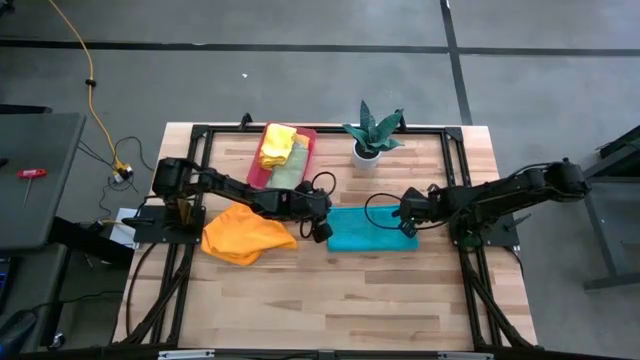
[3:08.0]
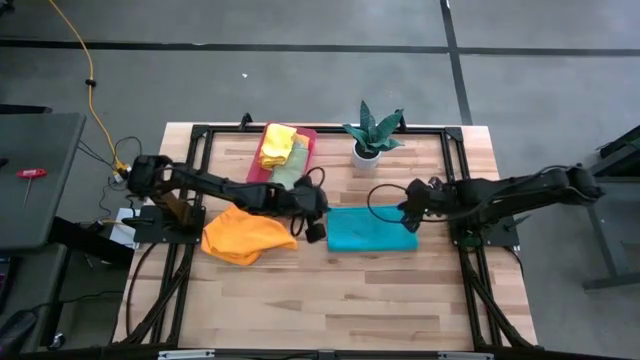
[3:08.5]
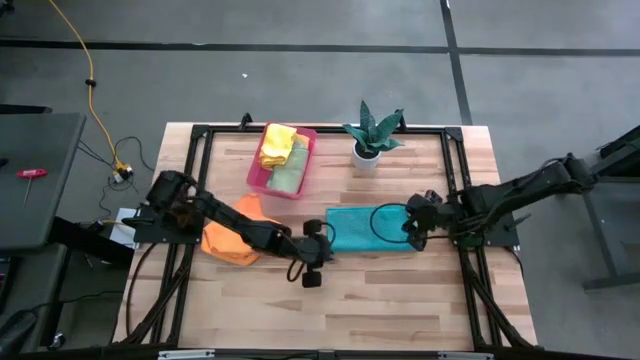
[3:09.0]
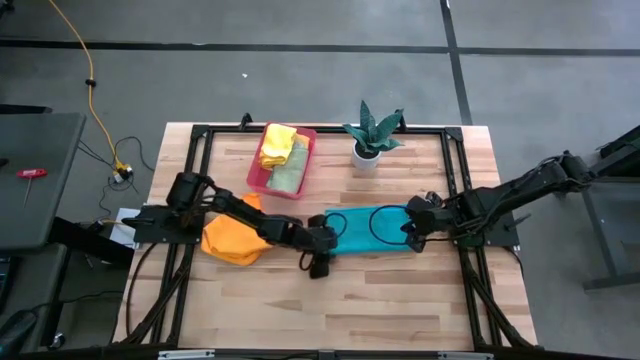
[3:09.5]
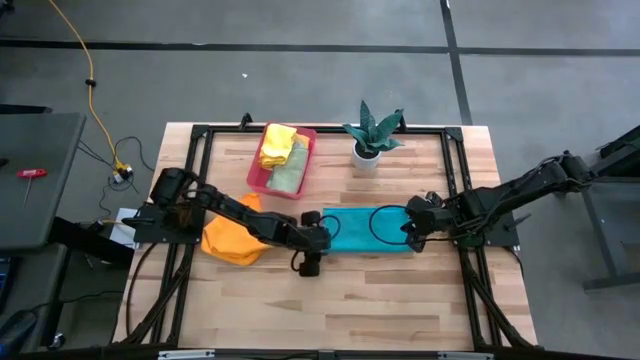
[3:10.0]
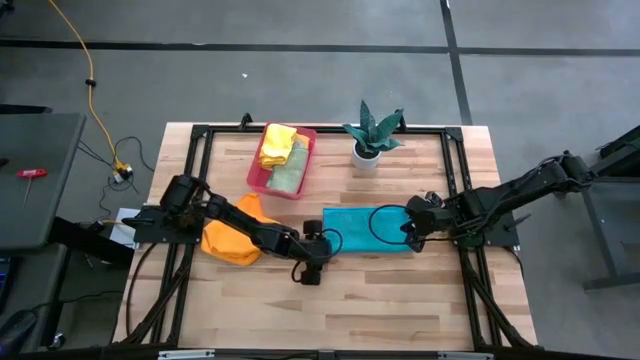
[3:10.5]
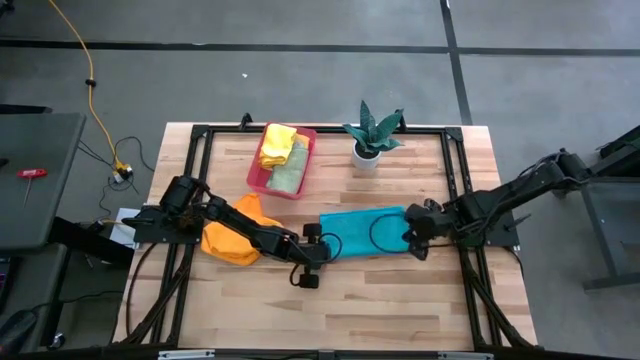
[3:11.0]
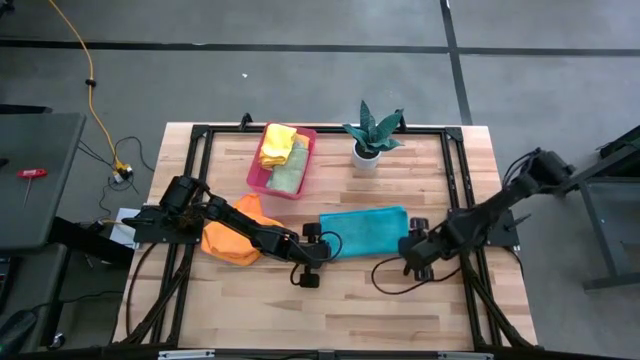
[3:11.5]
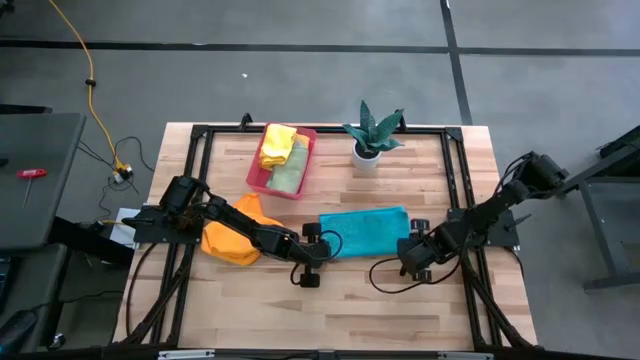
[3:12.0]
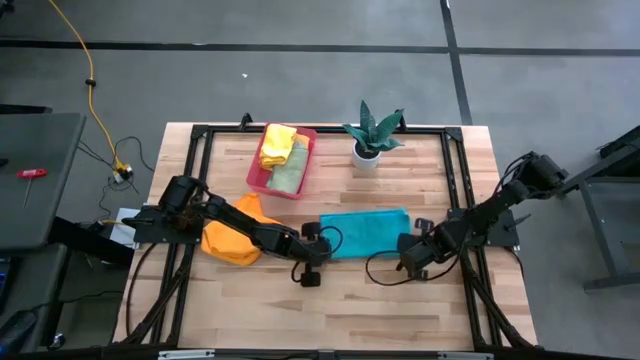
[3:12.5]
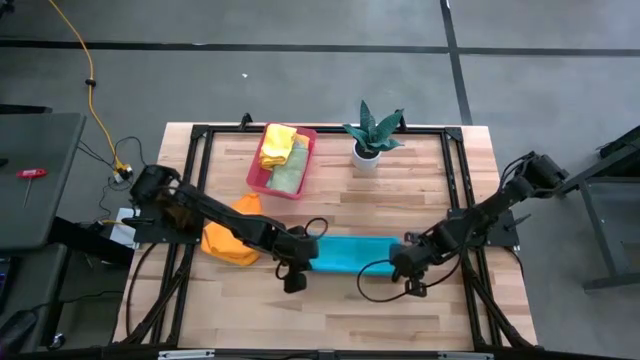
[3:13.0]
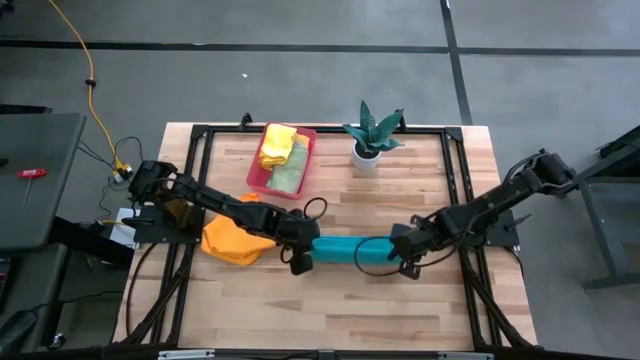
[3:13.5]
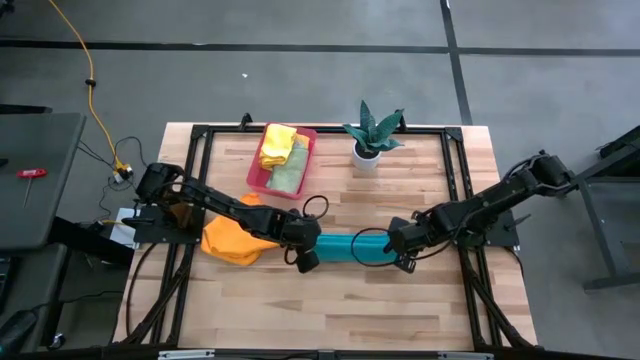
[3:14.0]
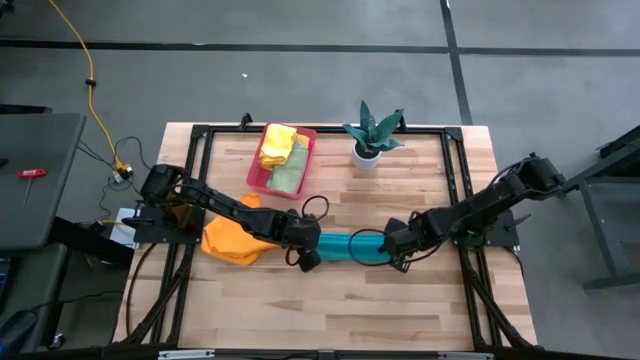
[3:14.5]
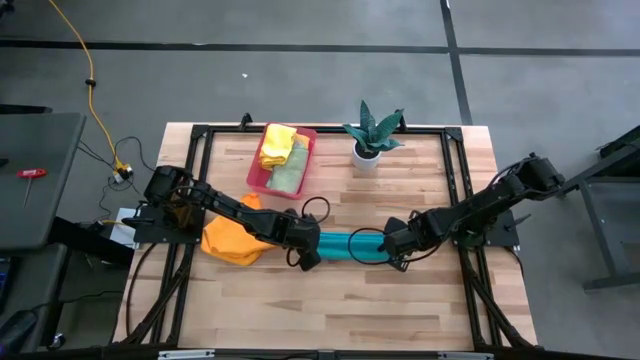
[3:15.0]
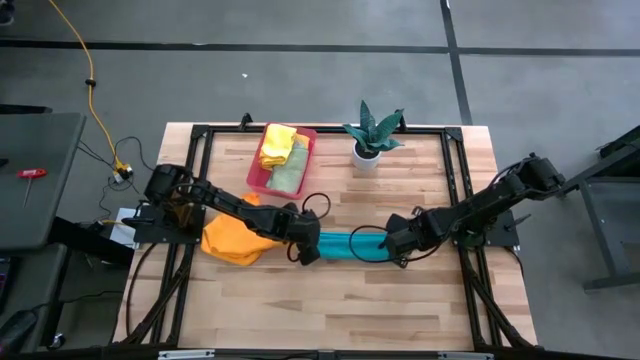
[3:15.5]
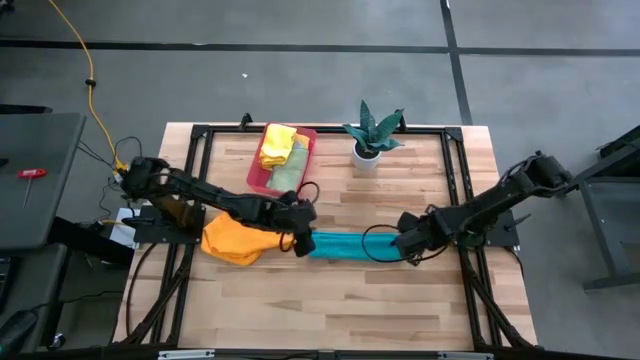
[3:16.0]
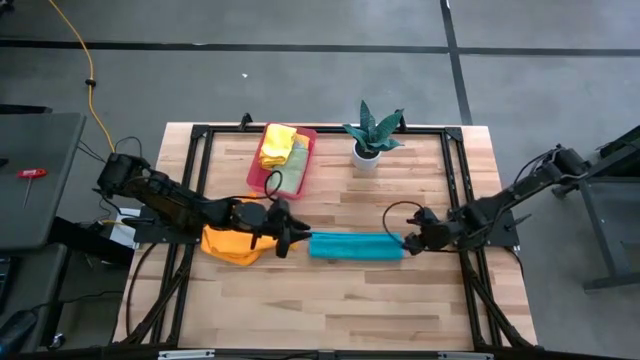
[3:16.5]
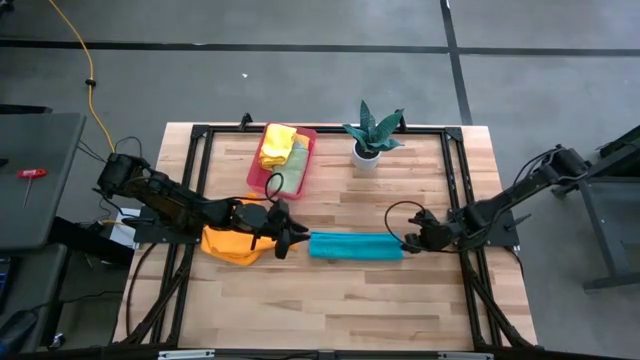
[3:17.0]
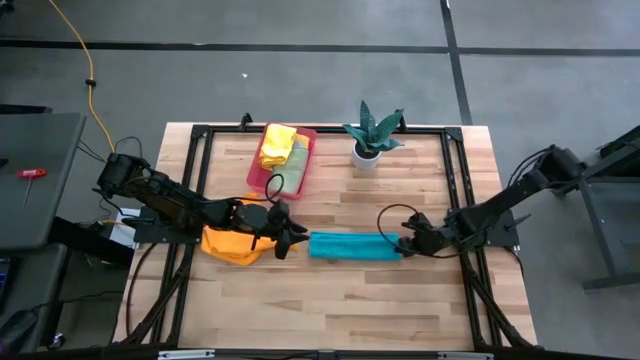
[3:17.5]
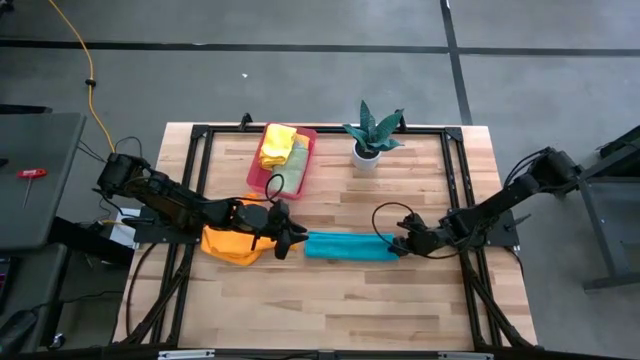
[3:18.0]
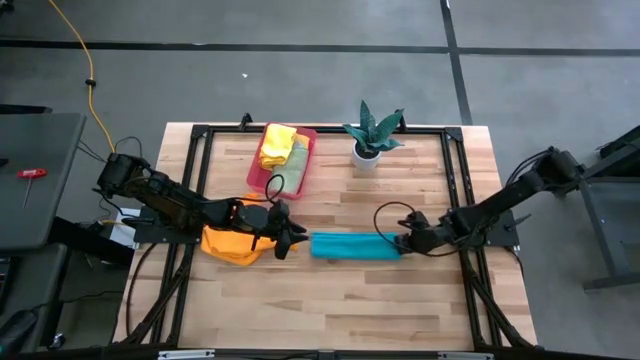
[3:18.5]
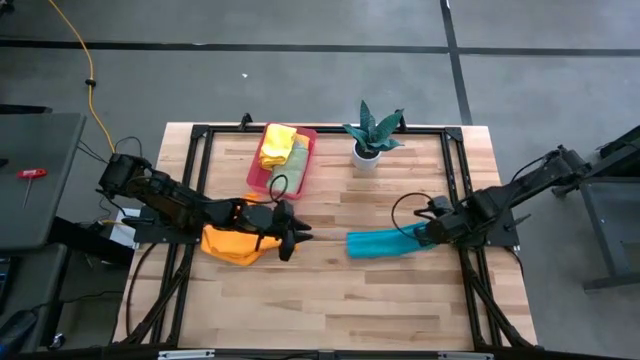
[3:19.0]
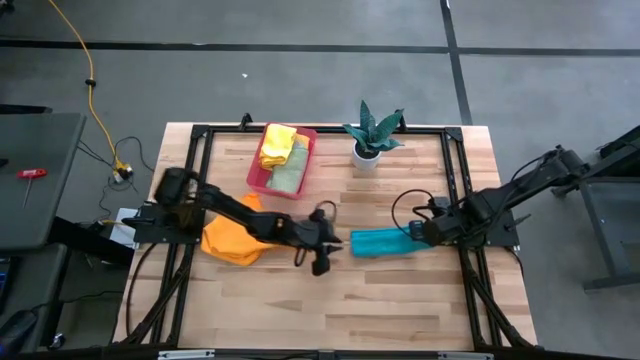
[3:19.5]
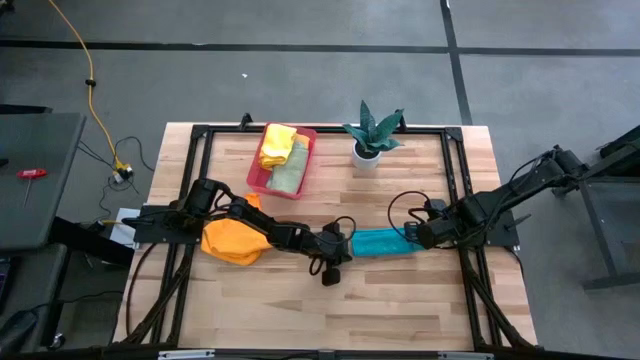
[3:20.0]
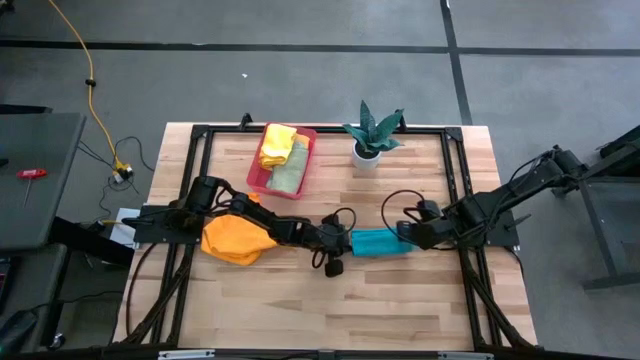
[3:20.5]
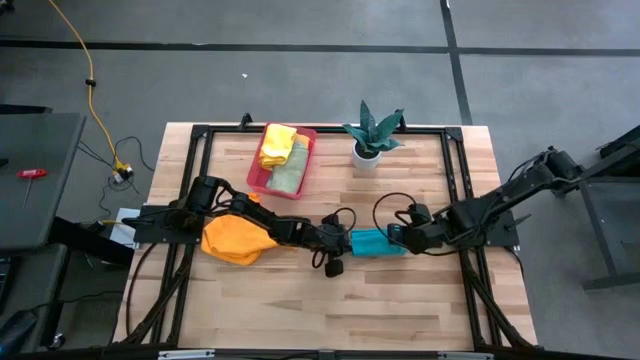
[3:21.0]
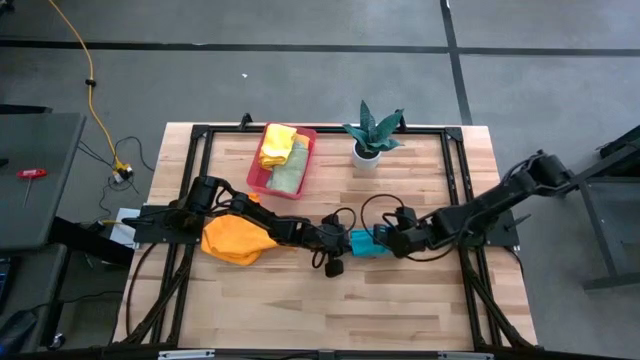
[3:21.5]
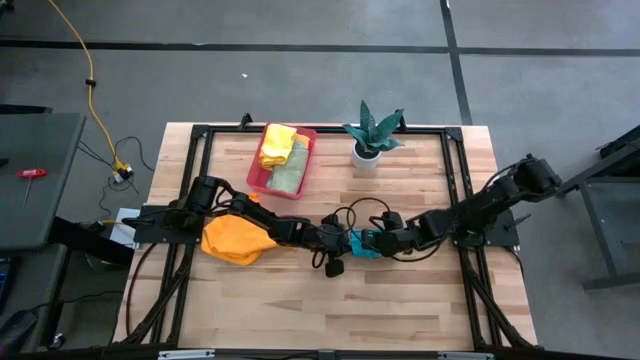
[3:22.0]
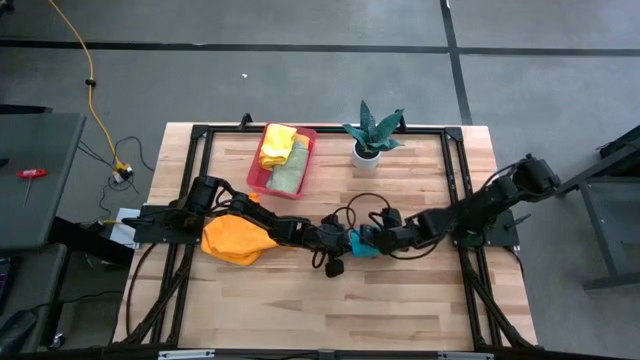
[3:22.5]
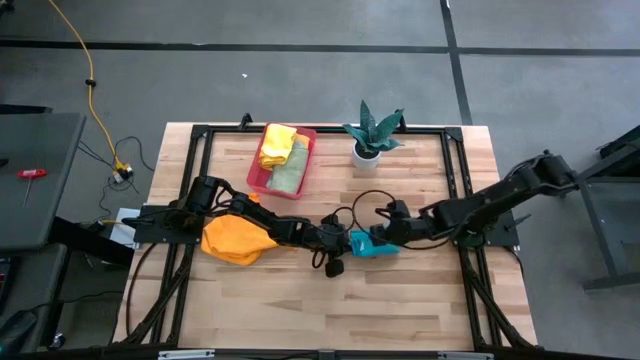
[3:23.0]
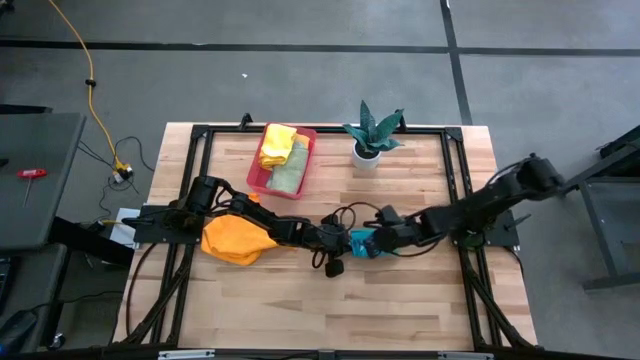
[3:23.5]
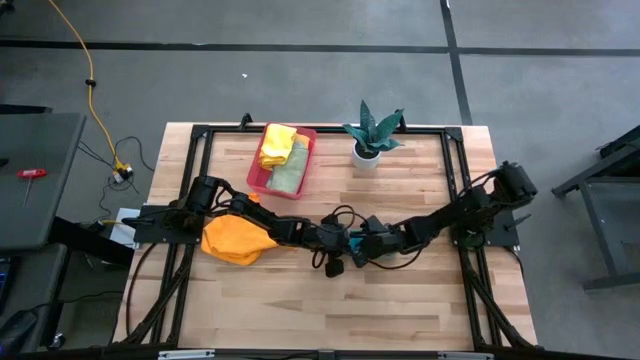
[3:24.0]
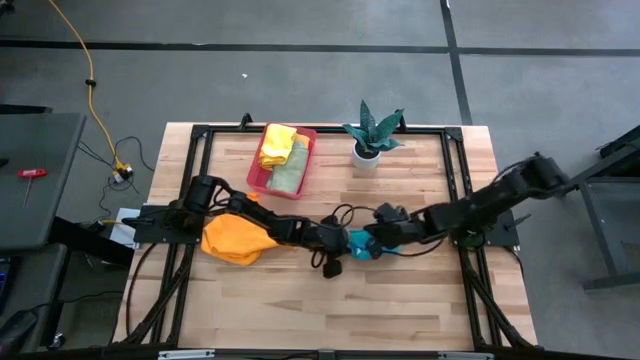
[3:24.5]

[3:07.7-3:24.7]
Task: Fold microfiber towels
Fold the blue microfiber cloth

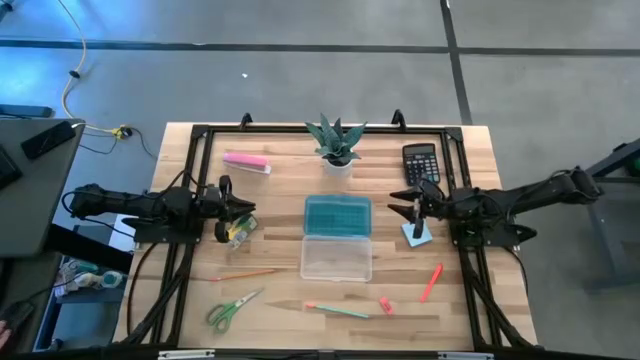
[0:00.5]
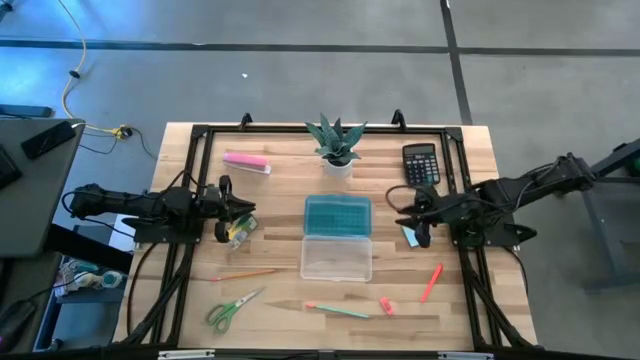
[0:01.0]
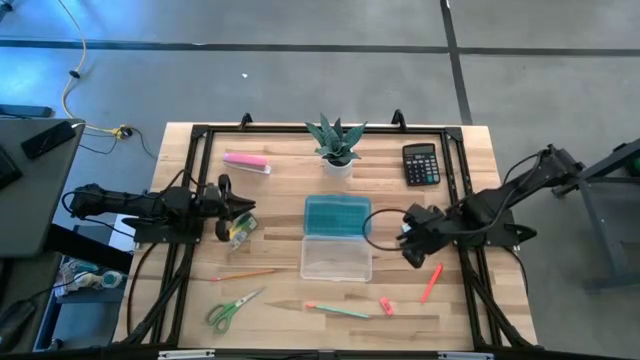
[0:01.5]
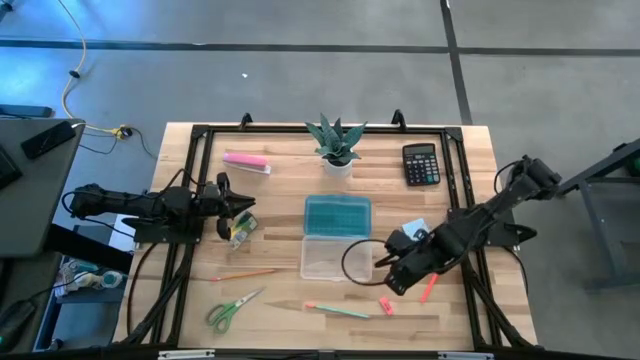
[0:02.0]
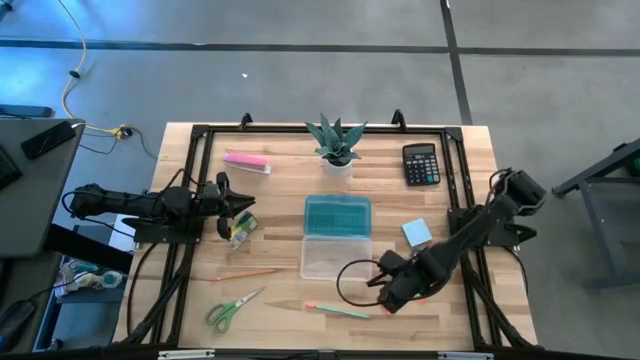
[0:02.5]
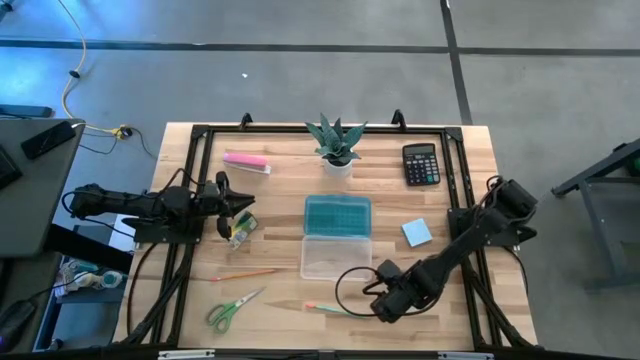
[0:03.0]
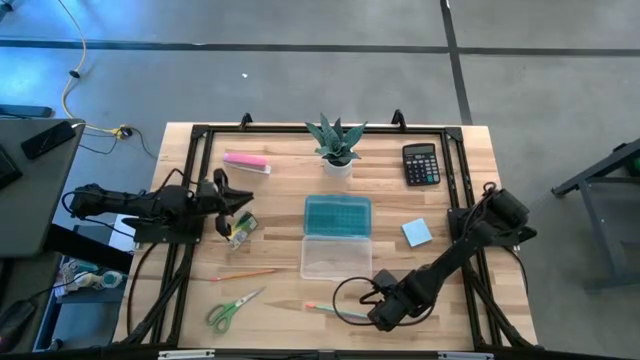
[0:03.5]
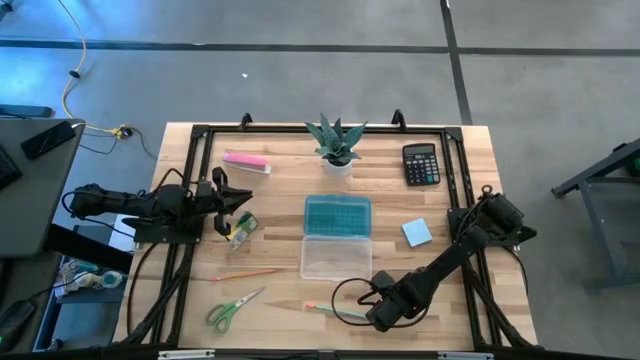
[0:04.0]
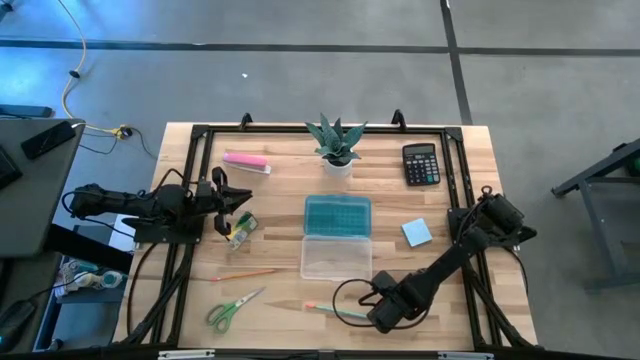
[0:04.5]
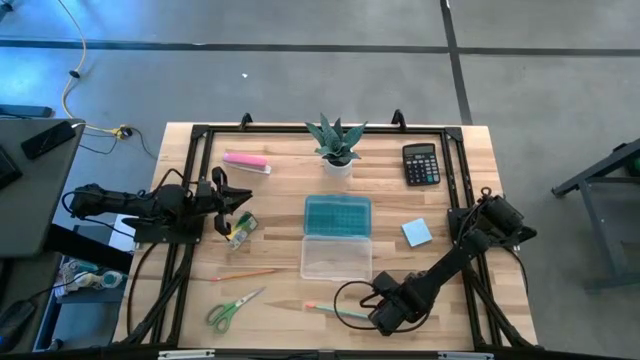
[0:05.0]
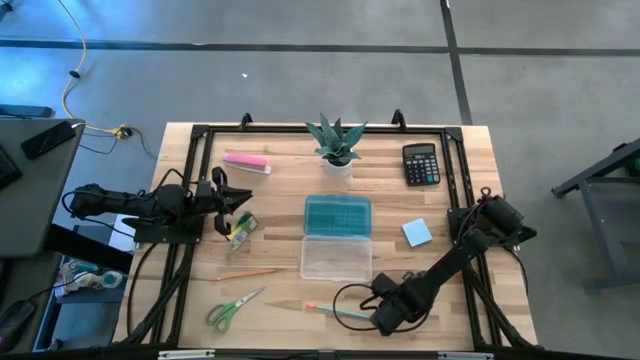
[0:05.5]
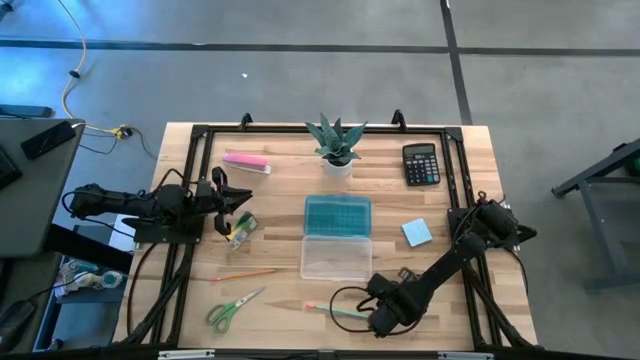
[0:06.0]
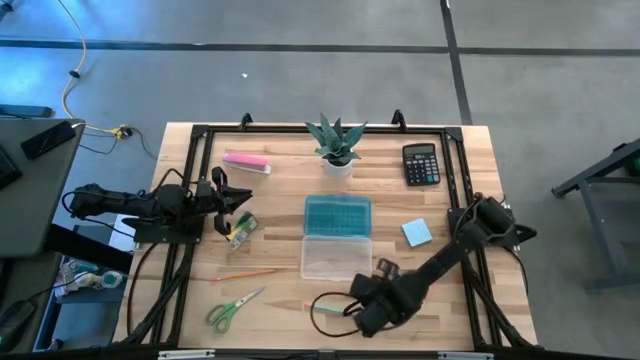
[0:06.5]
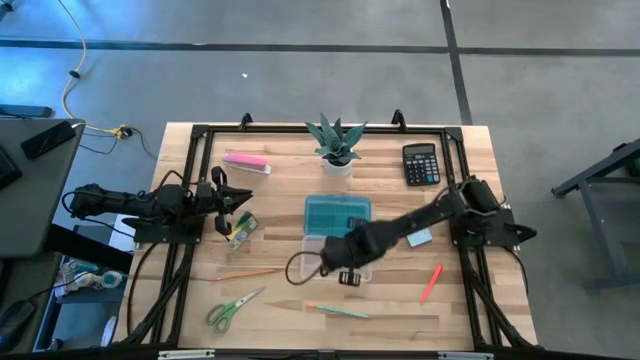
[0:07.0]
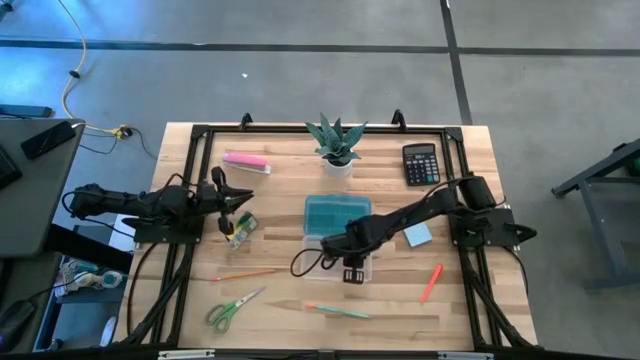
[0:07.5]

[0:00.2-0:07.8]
Task: Pack school essentials
Put the pink eraser into the blue supply box
